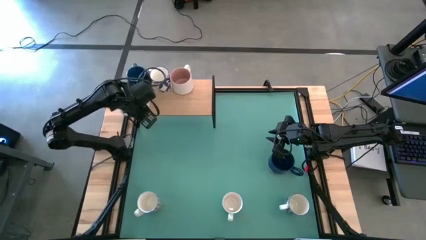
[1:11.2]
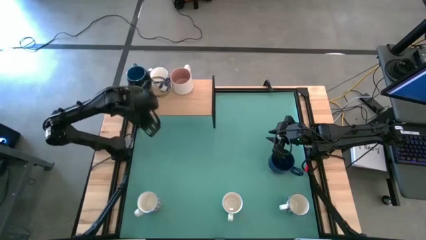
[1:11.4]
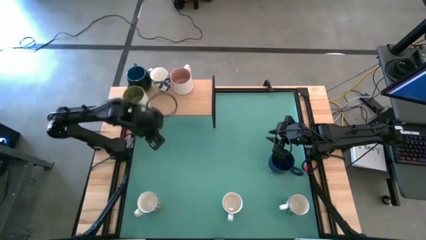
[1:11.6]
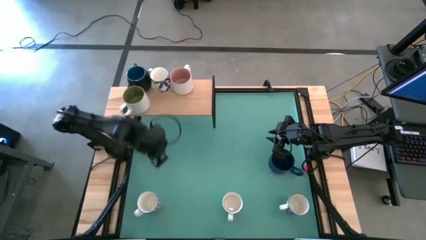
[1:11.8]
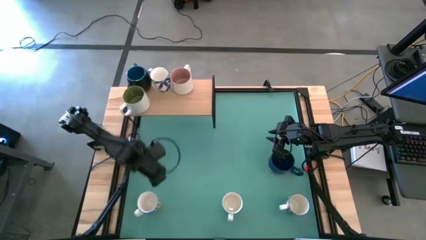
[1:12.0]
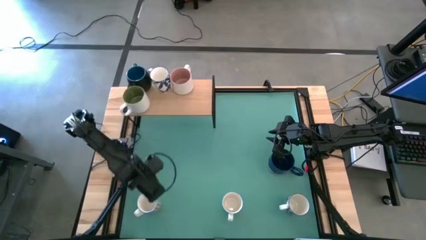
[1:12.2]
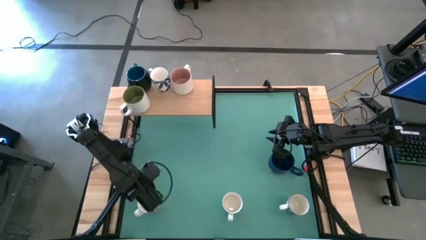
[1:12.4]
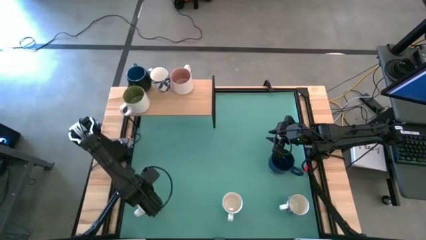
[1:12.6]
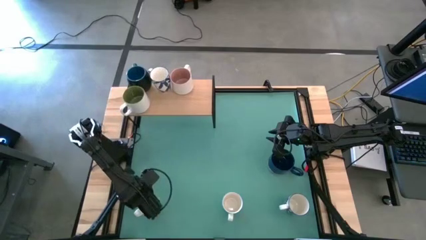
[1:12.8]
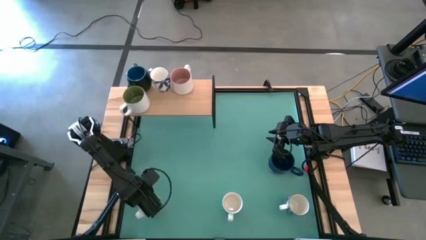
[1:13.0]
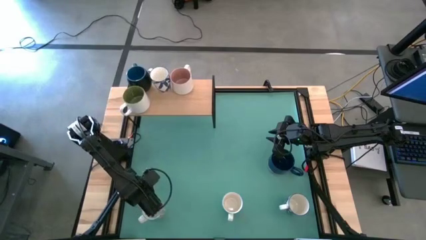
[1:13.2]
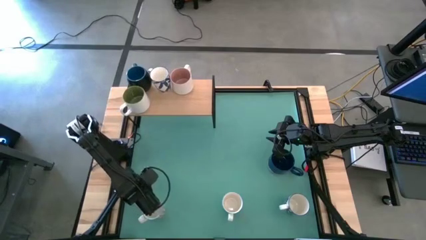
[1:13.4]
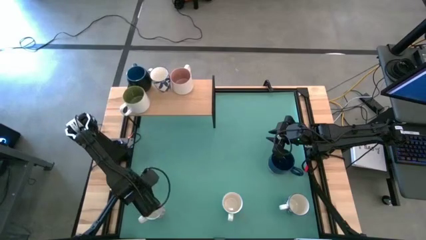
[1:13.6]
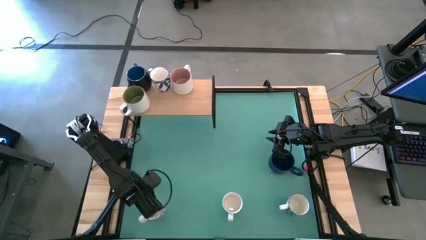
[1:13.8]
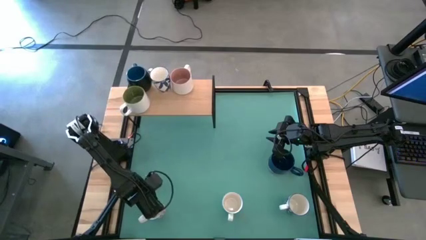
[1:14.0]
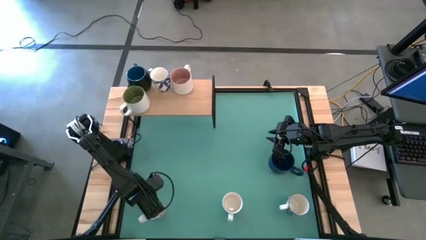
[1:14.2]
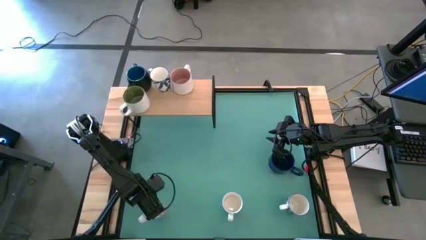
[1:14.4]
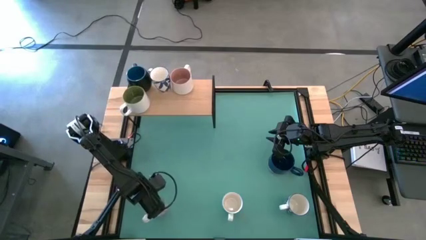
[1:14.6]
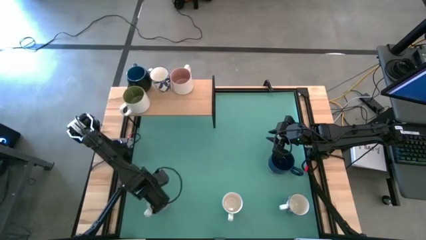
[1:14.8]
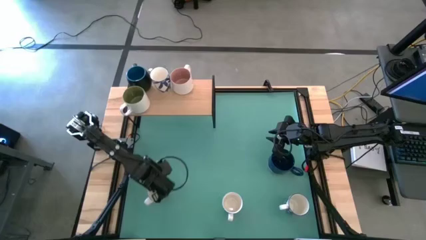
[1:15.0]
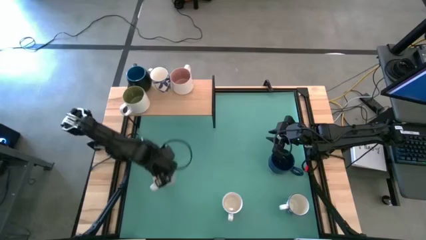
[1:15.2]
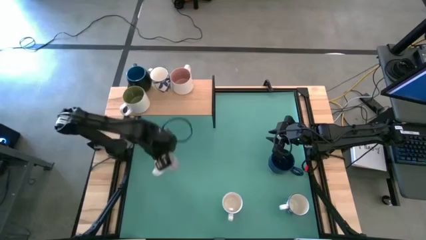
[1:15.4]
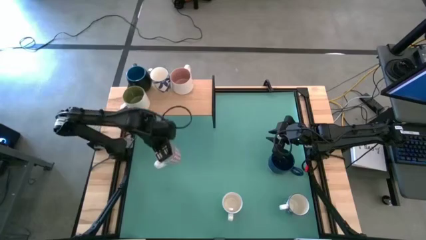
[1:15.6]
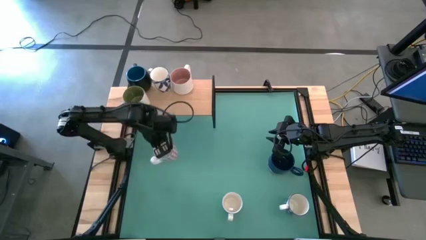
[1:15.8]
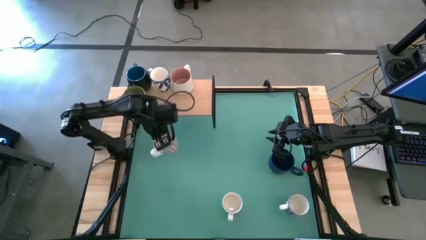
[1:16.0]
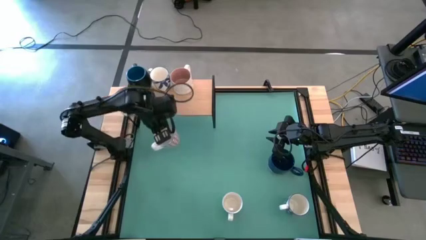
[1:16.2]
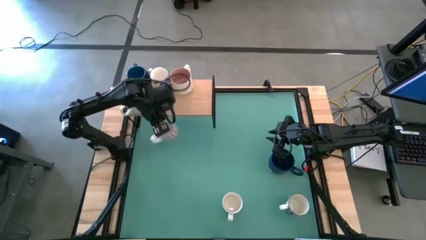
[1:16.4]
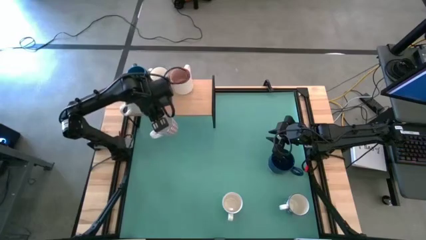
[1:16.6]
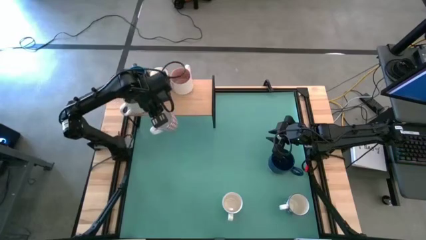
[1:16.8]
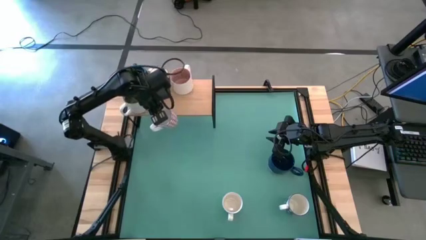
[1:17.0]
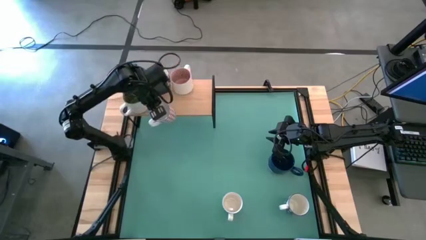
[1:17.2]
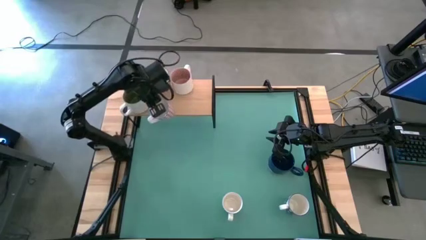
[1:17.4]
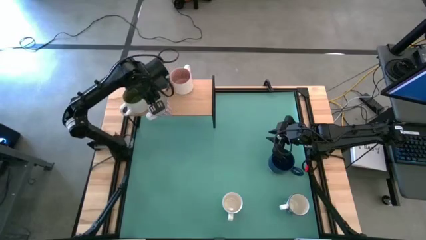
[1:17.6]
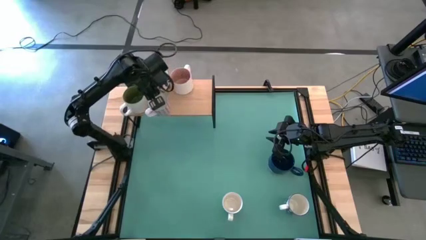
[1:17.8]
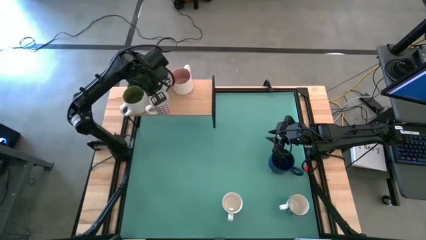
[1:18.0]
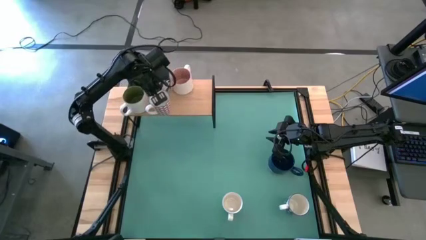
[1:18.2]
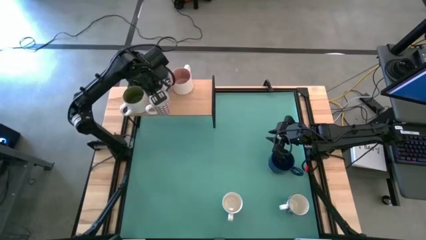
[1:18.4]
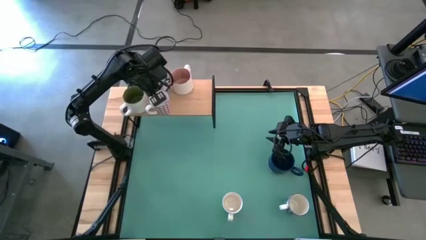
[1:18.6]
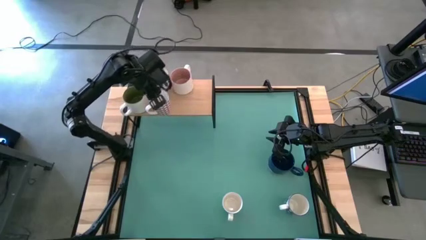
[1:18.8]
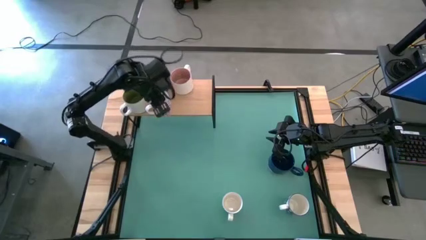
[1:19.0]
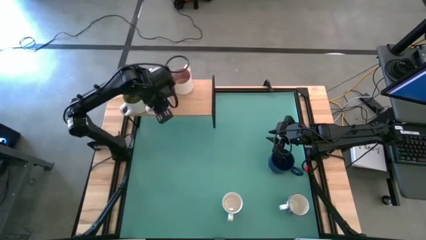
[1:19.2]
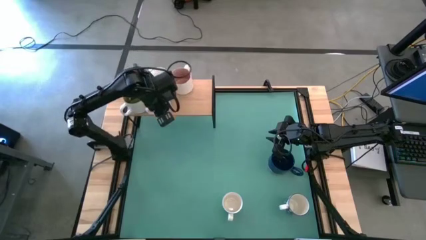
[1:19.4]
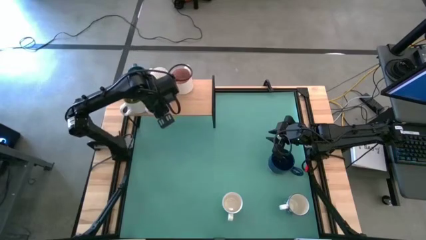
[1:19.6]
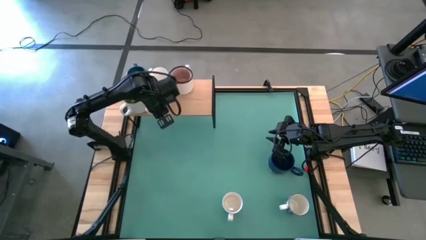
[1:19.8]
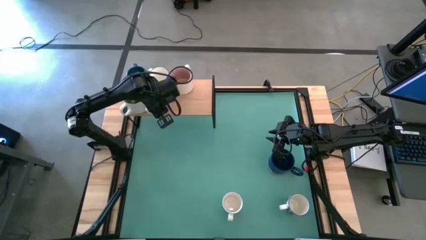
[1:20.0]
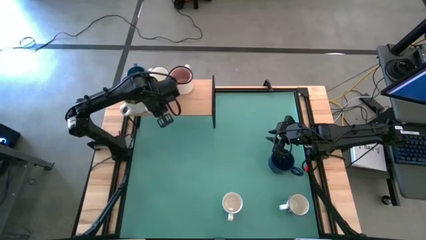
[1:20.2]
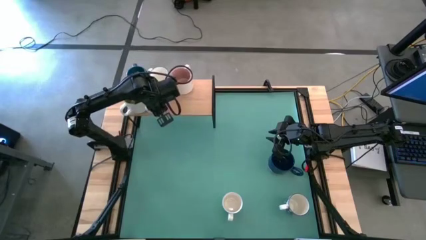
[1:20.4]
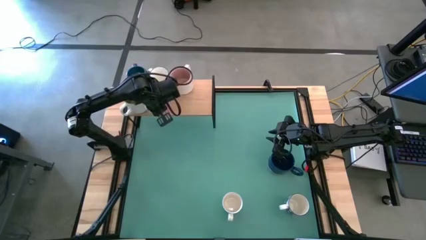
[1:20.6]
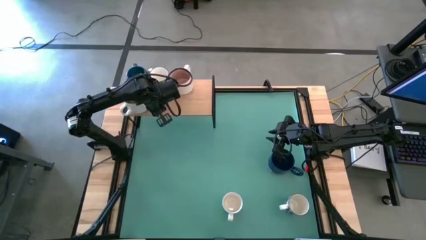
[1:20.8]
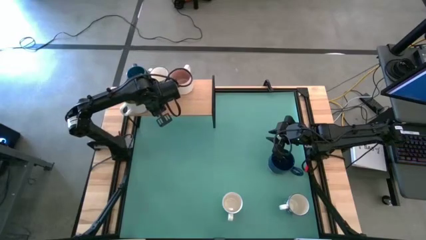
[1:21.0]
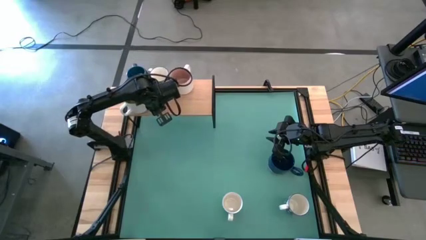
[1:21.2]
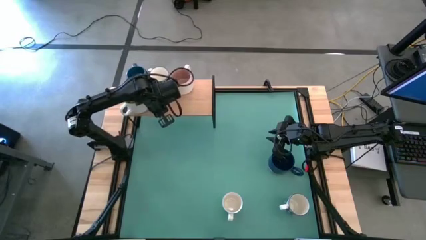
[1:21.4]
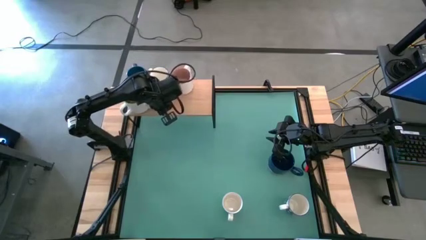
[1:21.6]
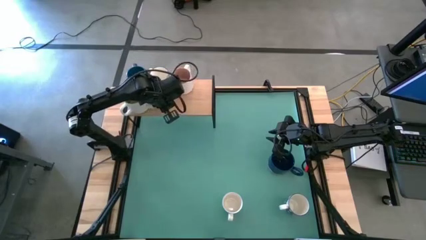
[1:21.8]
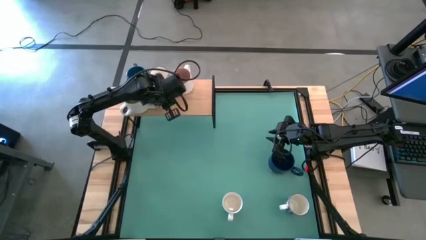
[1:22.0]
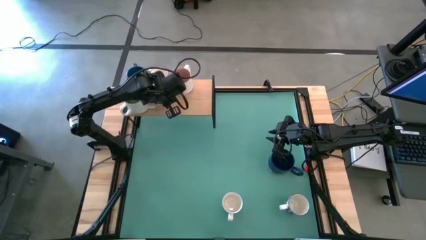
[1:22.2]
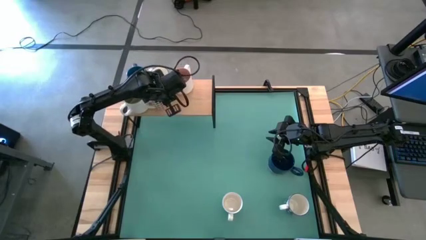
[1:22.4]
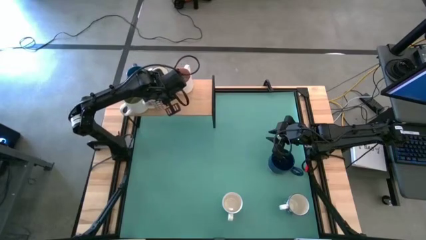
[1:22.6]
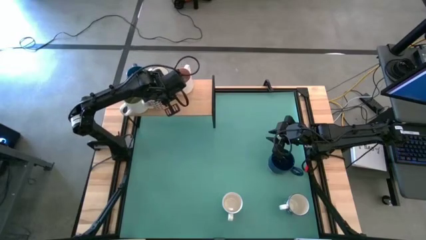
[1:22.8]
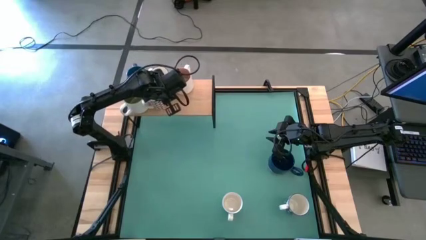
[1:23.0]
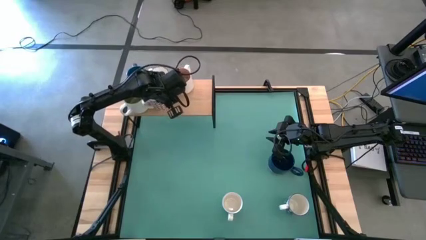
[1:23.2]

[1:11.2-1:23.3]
Task: Place coffee mugs
Put the red white patterned mug on the shelf
